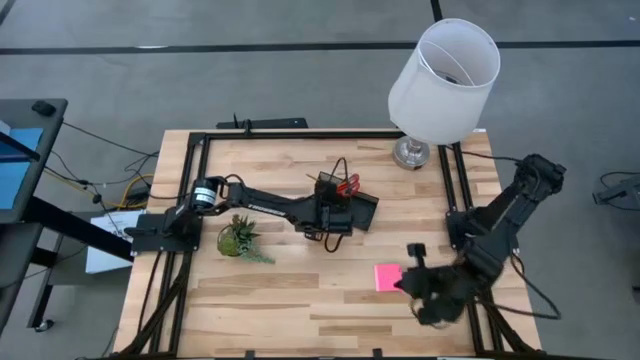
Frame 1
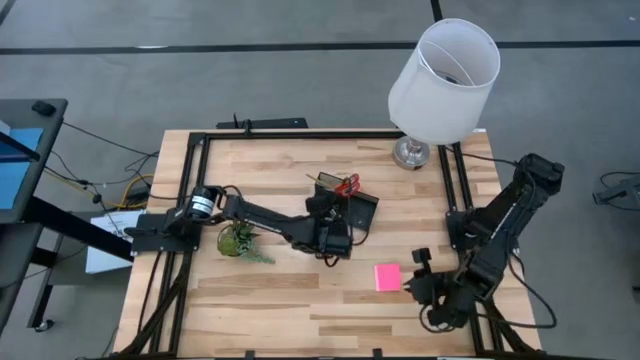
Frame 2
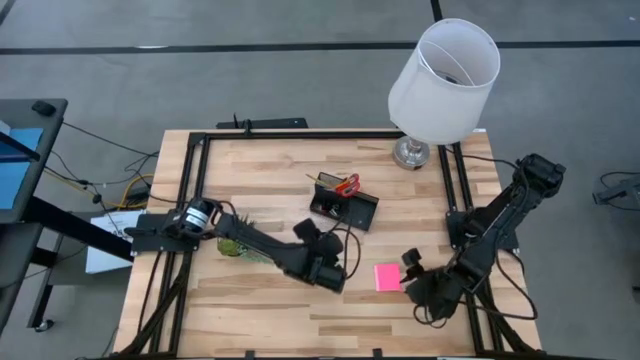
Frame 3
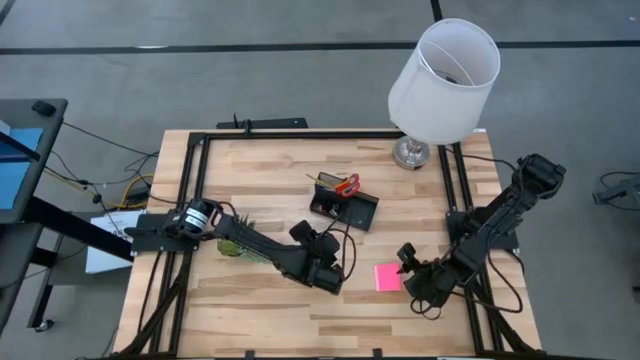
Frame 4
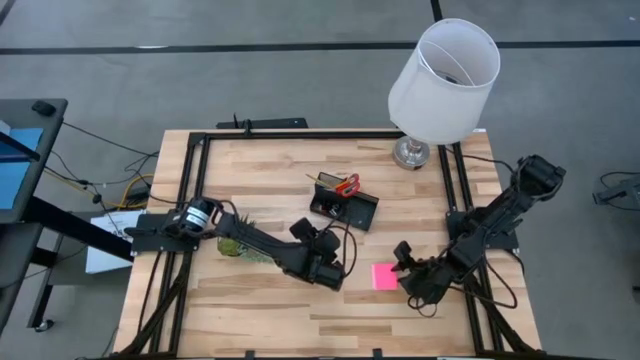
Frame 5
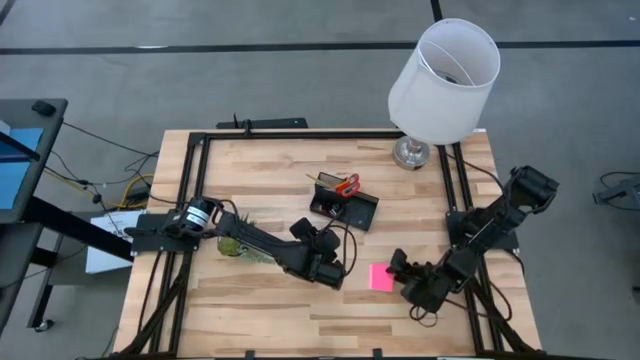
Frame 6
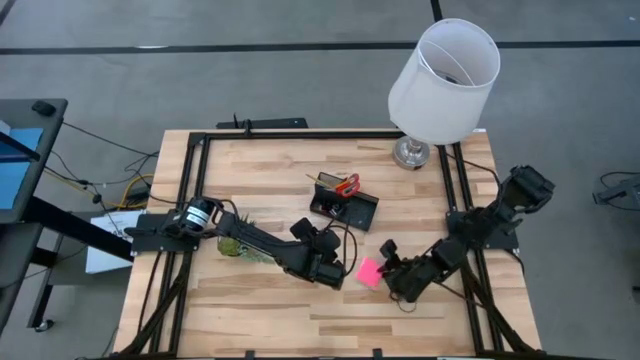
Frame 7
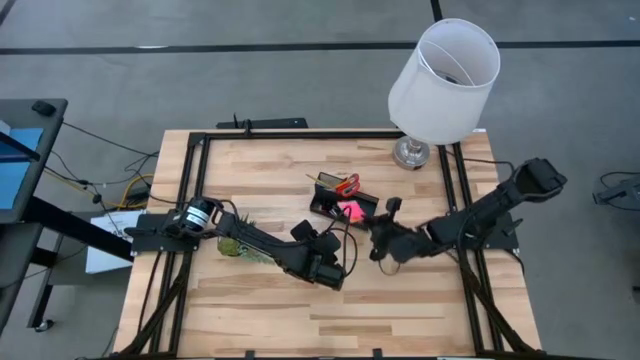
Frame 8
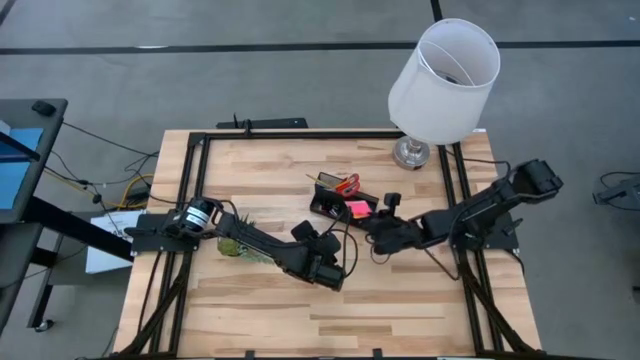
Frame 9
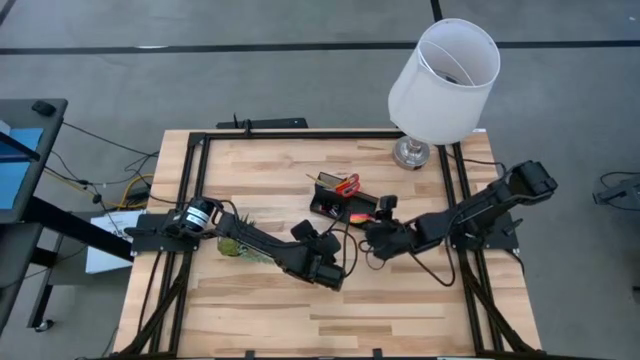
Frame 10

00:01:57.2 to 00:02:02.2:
Task: Pick and place office supplies into organizer
Put the pink sticky notes into the right compartment of the black desk organizer

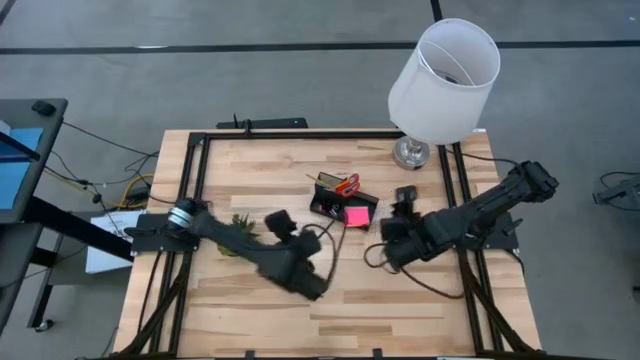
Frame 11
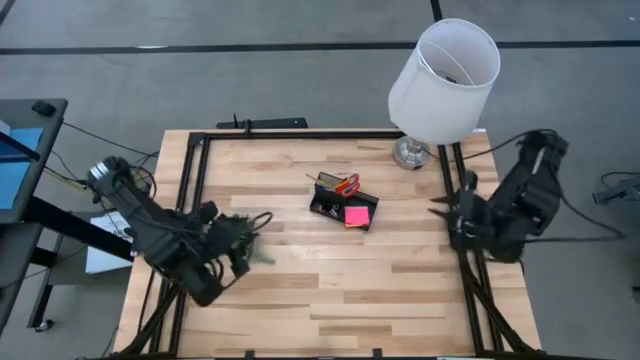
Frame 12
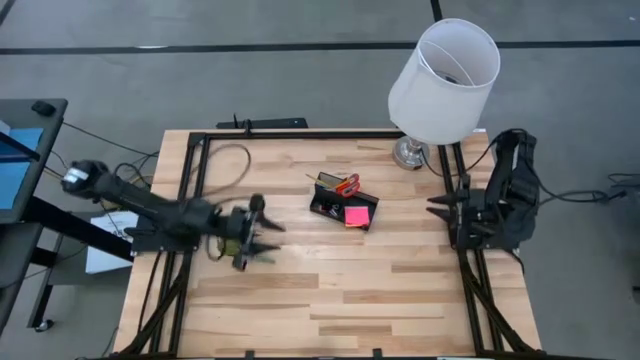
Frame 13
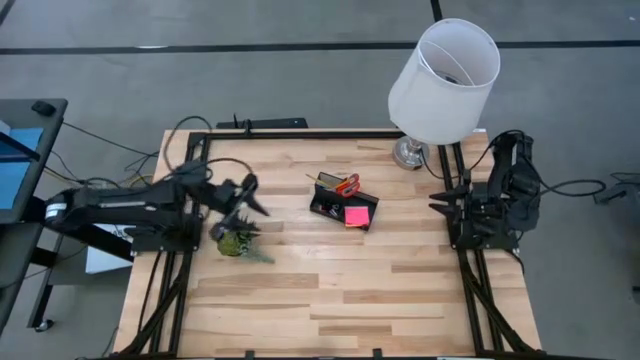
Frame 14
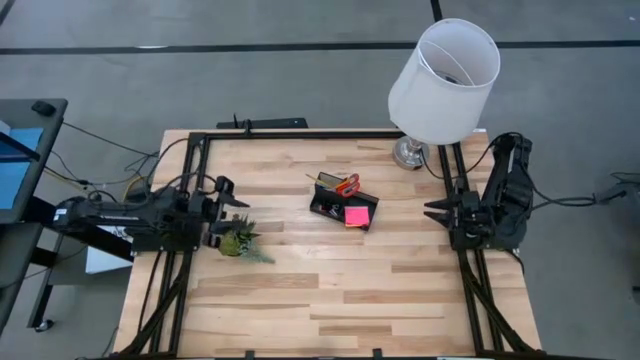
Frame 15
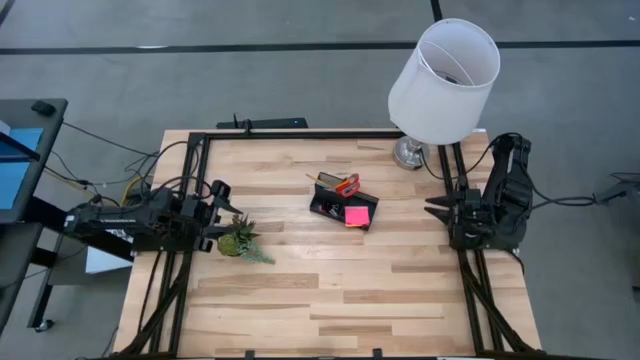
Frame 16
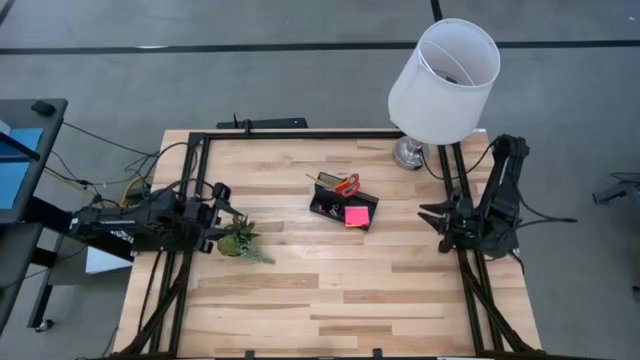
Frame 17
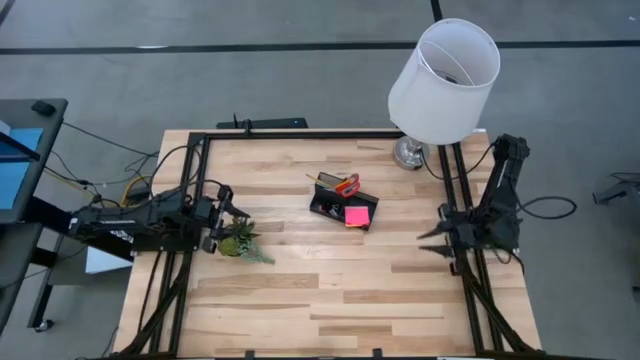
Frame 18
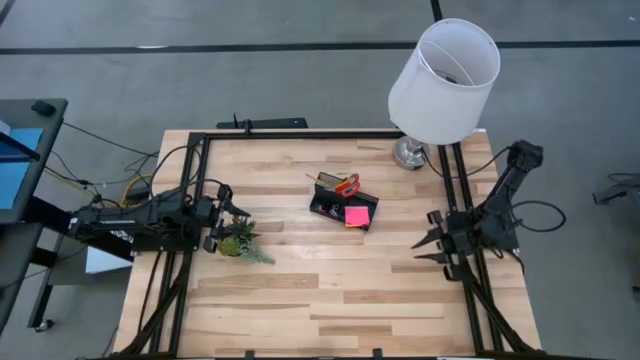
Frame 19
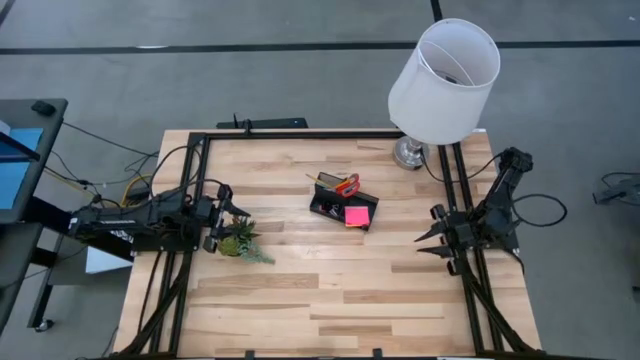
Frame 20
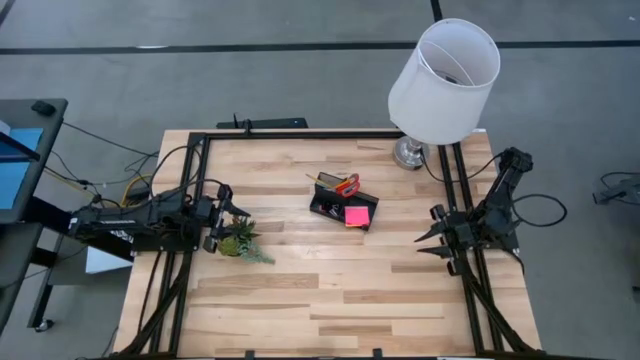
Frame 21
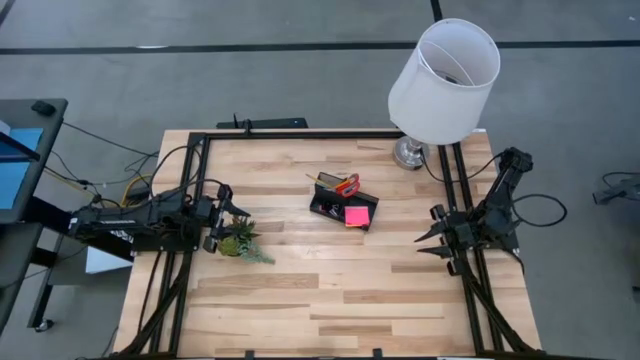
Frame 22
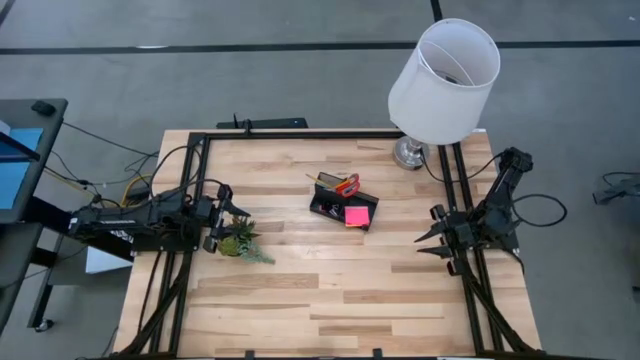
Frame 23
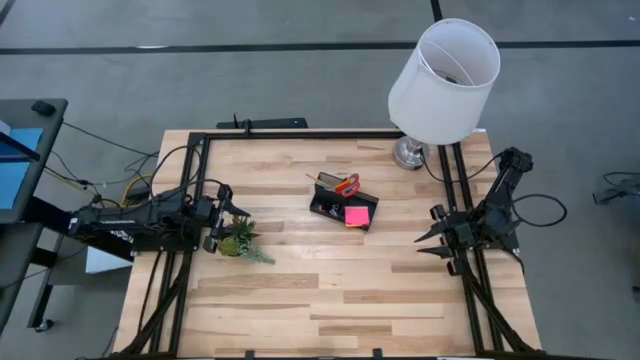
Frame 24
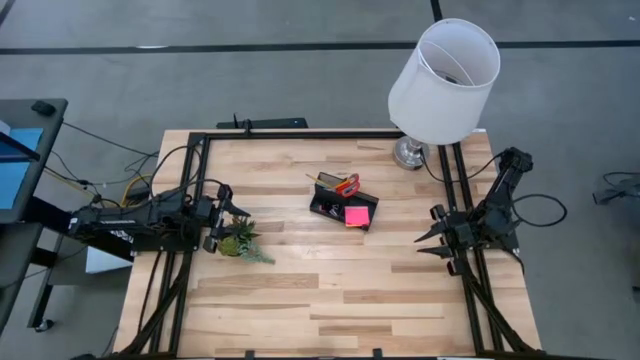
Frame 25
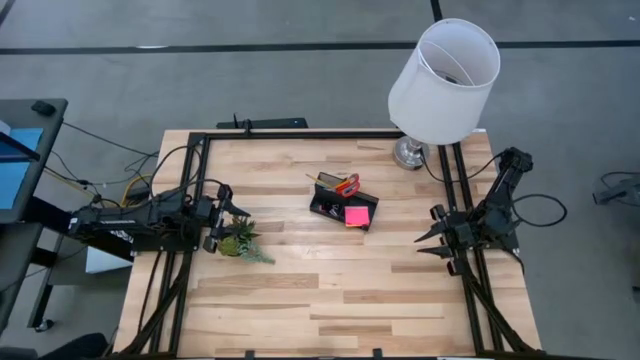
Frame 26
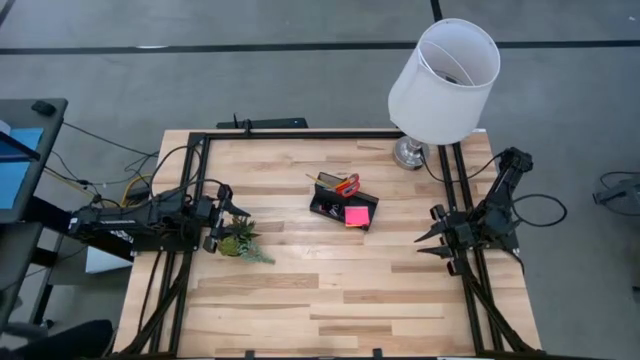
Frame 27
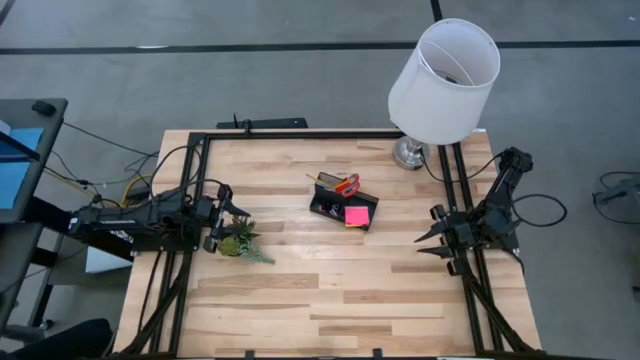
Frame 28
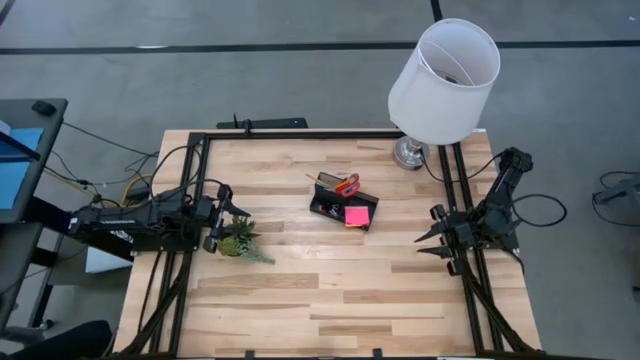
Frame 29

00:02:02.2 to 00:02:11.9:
Return to Home Position

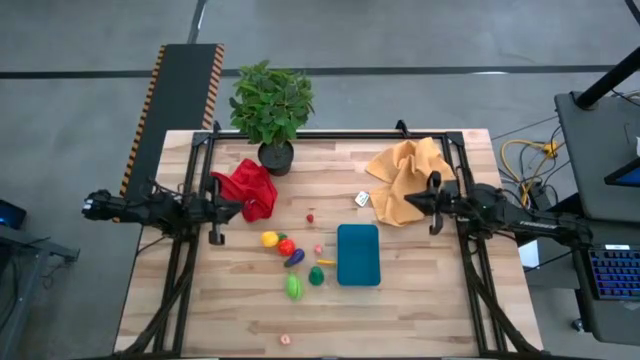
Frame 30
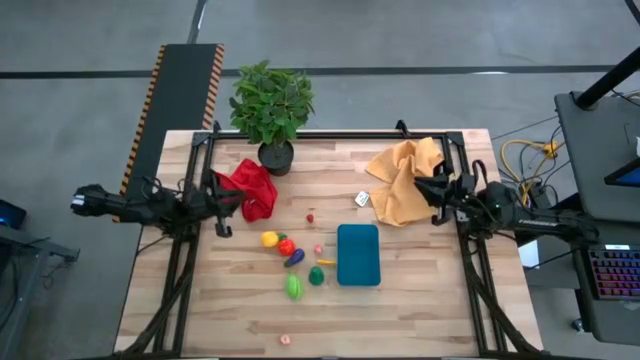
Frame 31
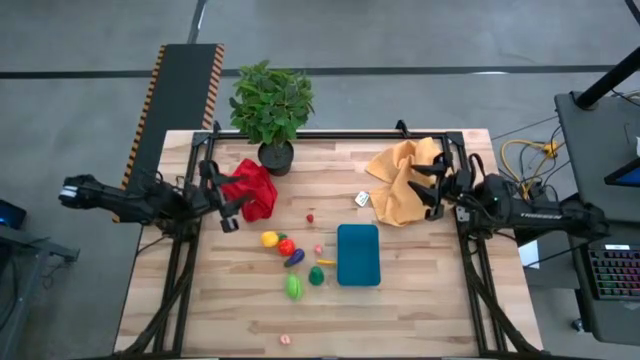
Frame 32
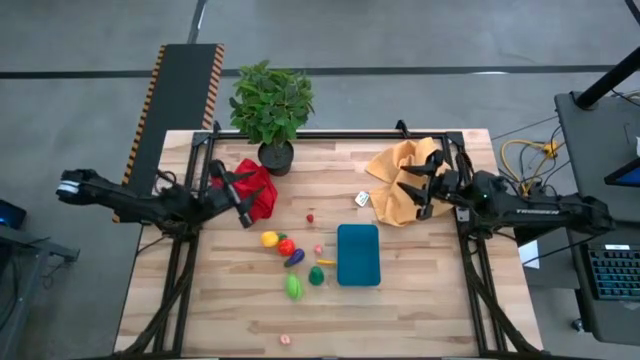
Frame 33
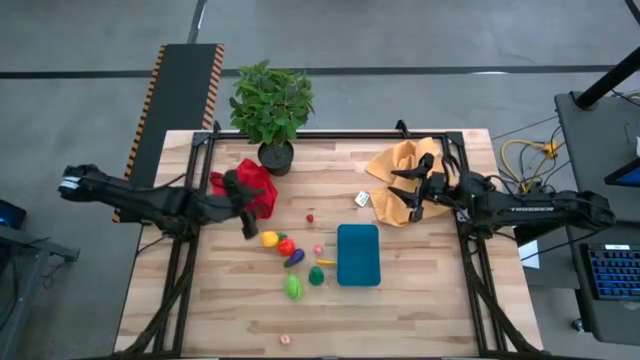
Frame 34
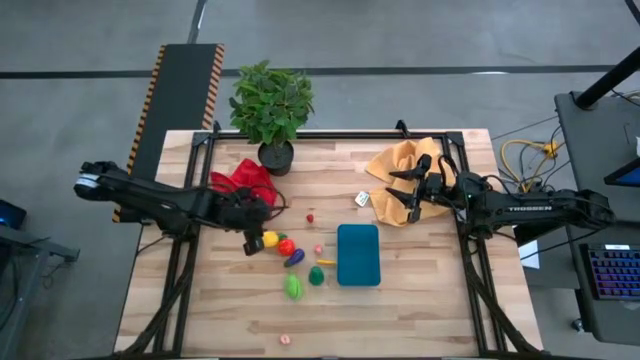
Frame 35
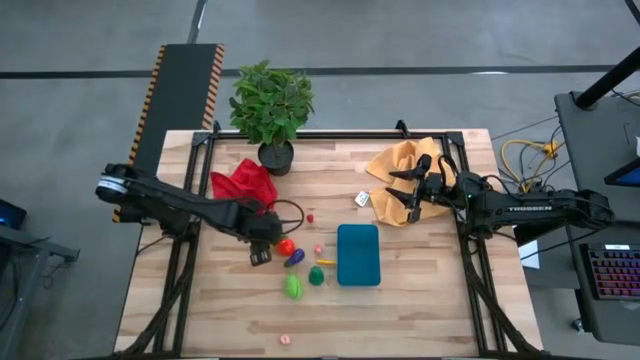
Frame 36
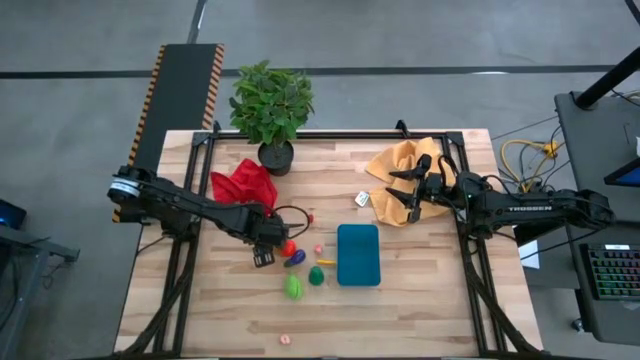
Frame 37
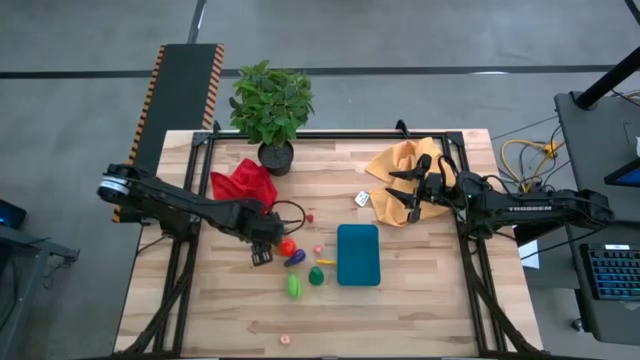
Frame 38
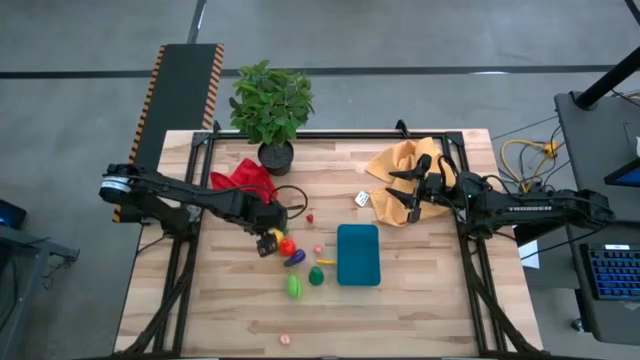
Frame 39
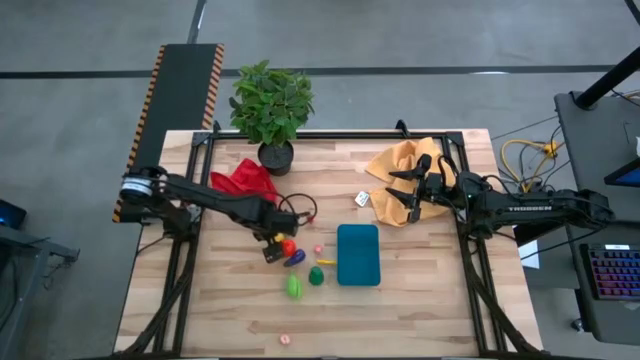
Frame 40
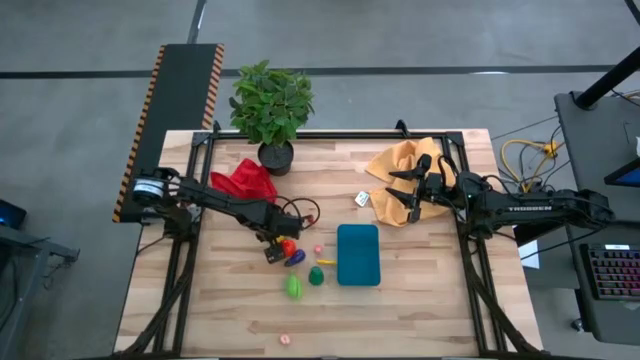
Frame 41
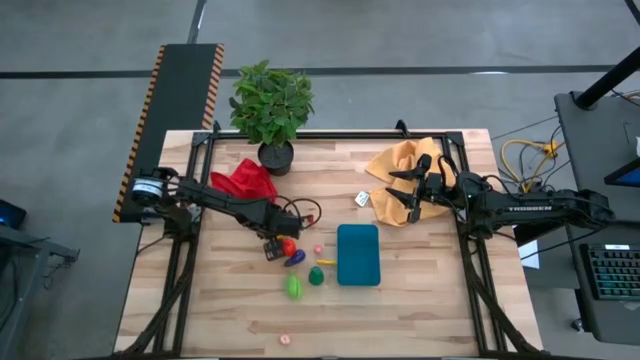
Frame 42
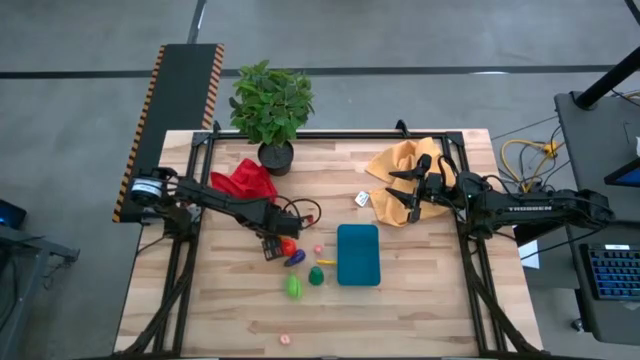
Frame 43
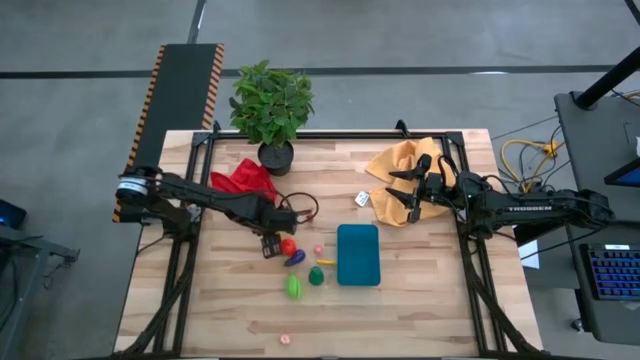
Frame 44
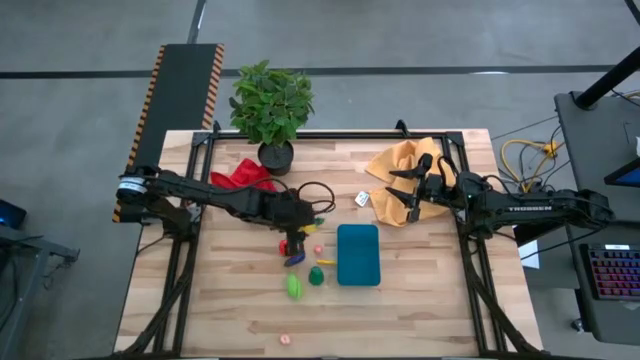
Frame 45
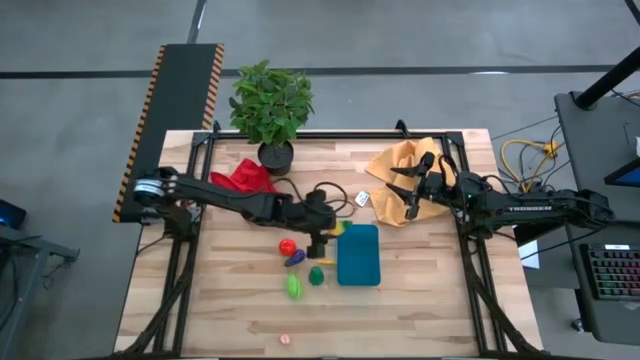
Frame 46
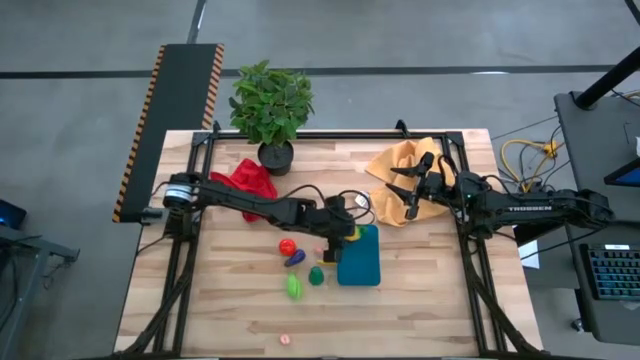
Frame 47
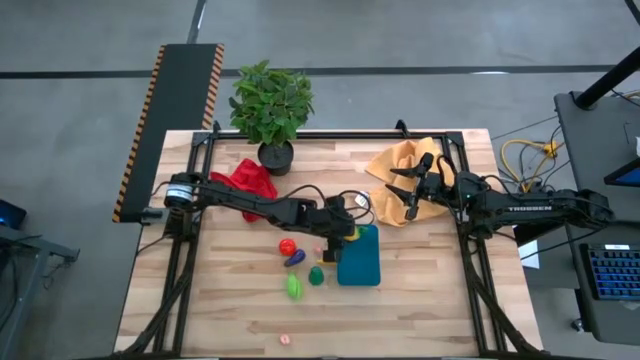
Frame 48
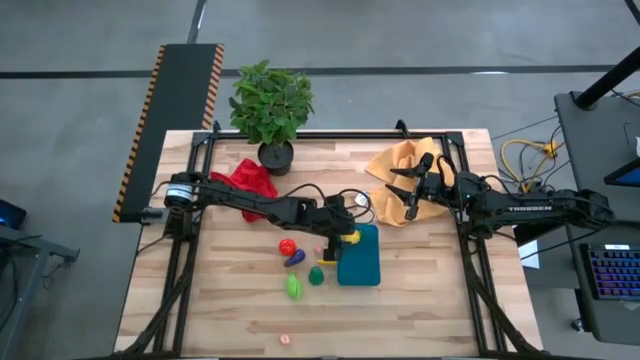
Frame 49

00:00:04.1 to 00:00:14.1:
Task: Pick and placing Produce into tupperware
Put the yellow pineapple into the blue bin
